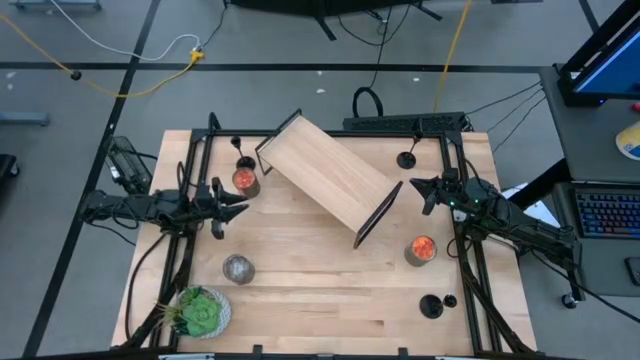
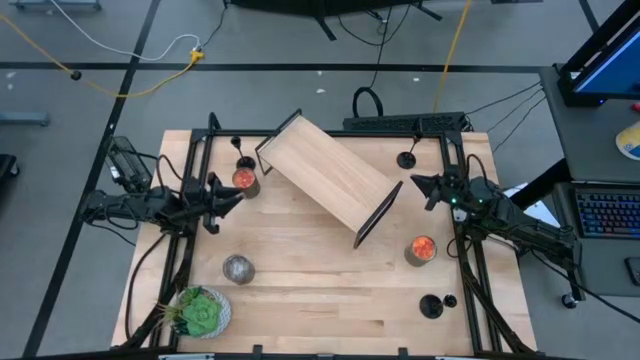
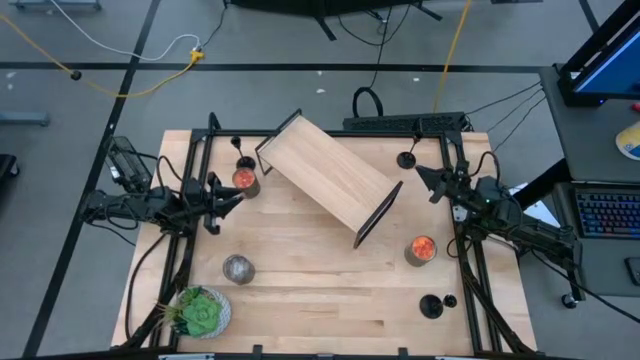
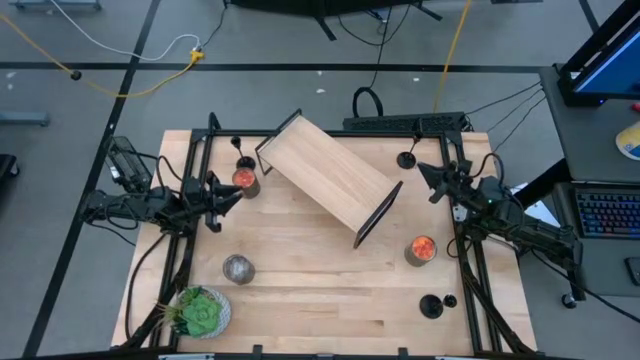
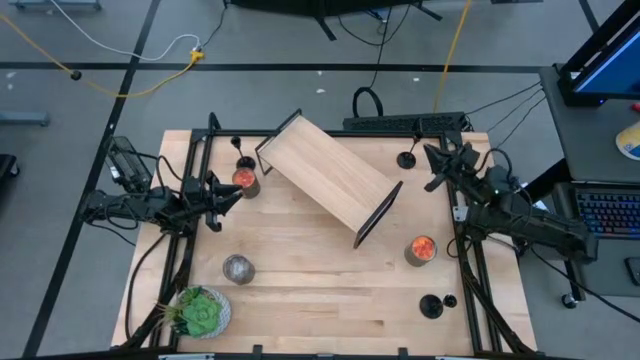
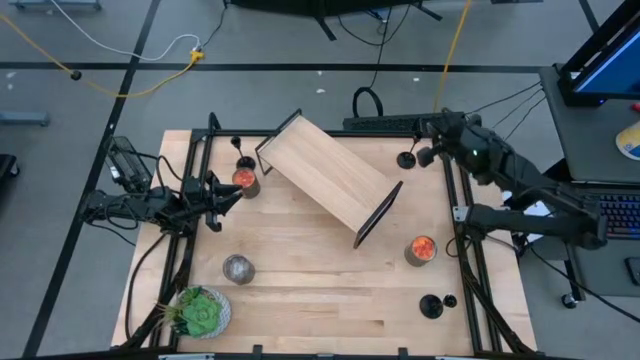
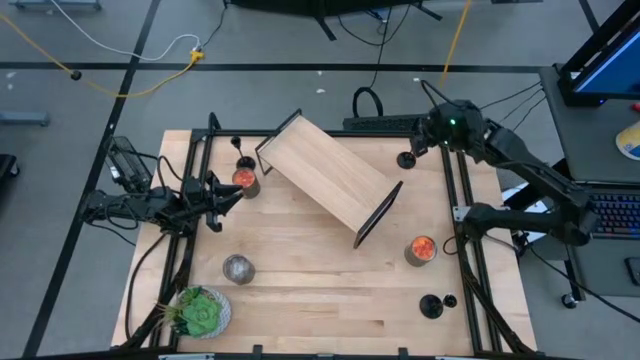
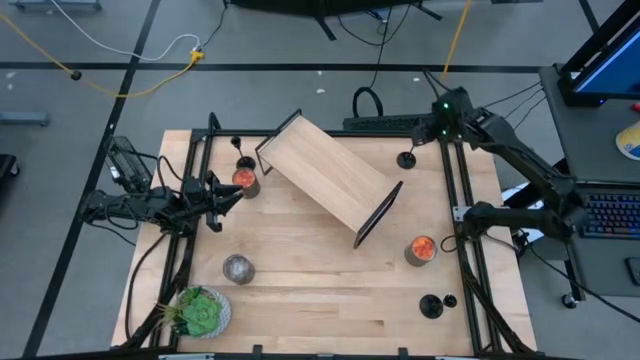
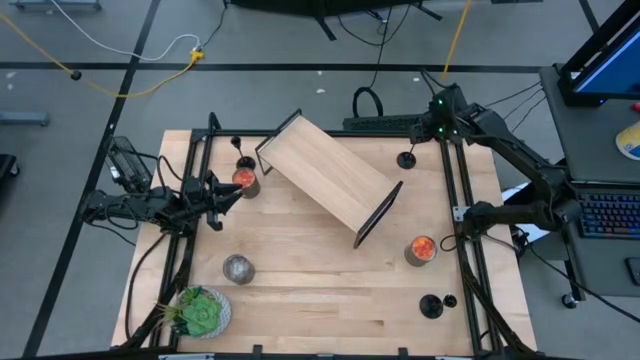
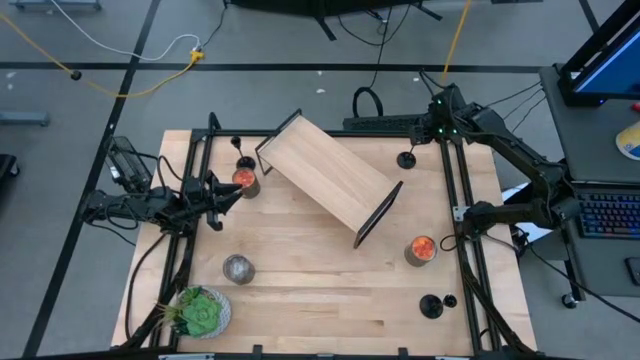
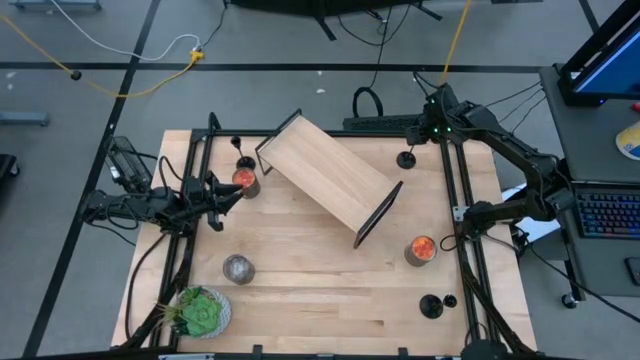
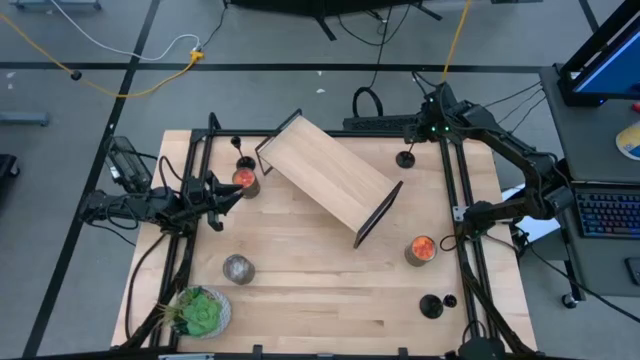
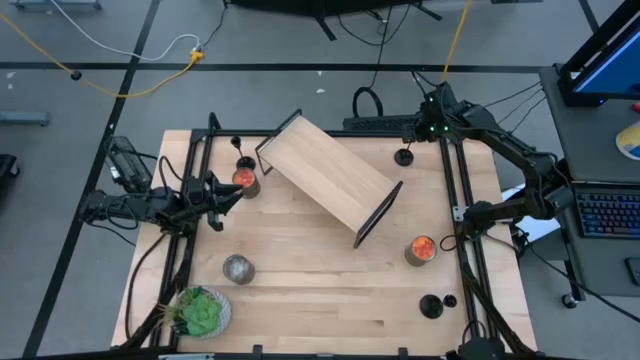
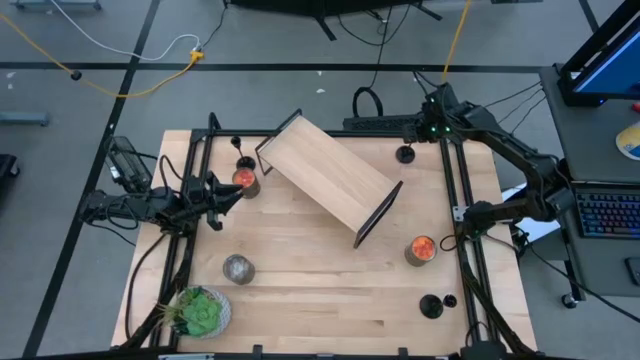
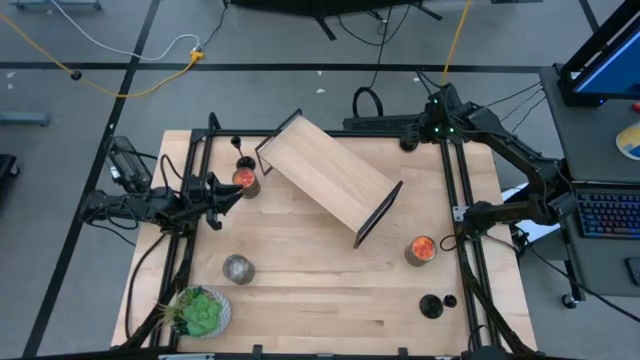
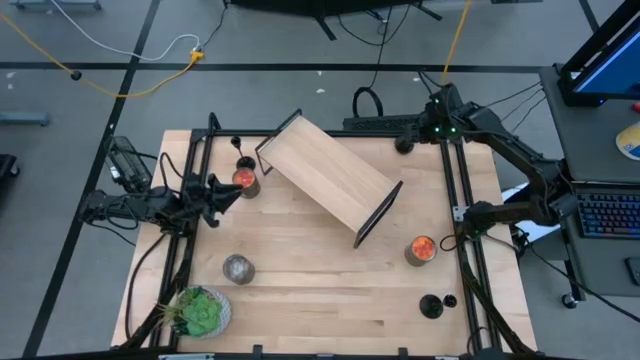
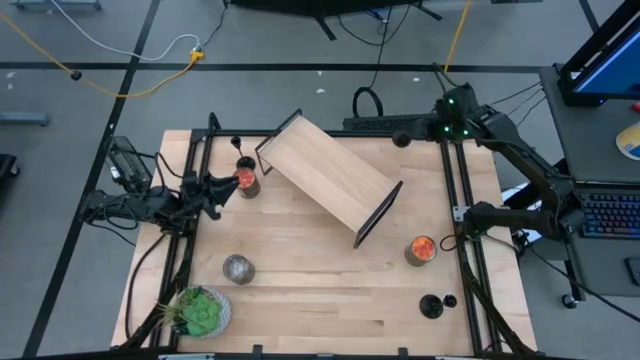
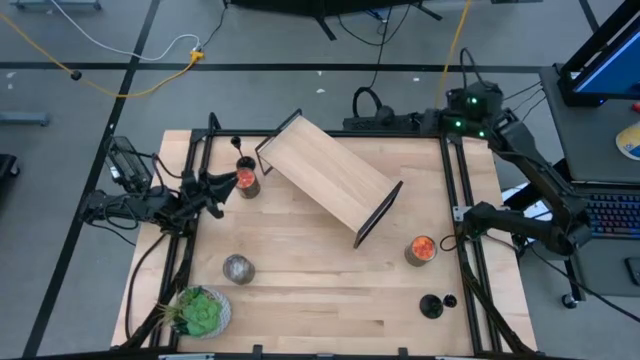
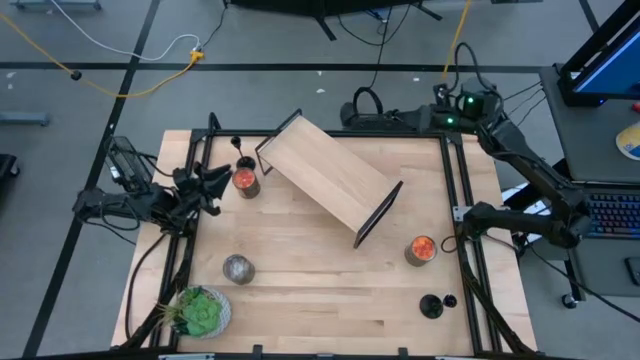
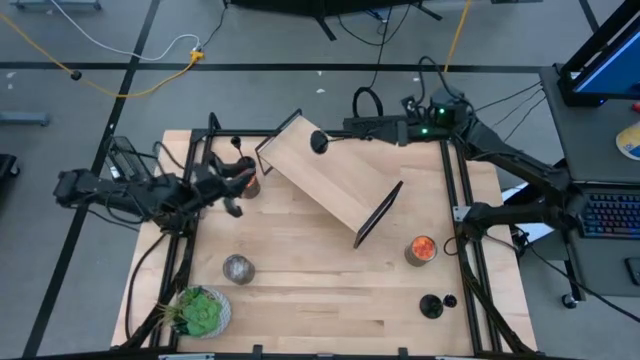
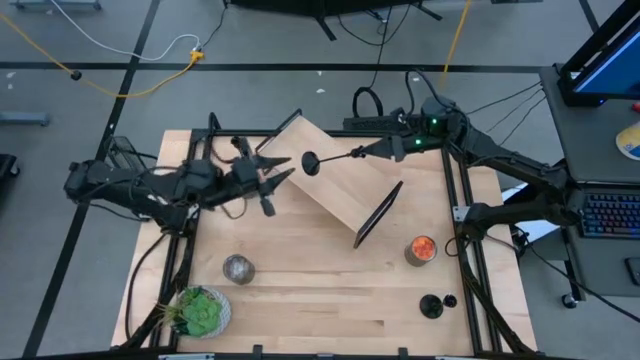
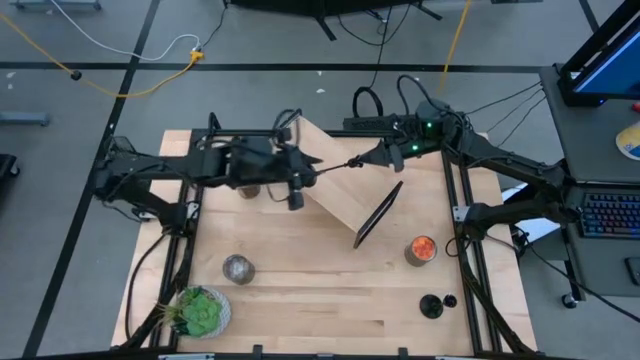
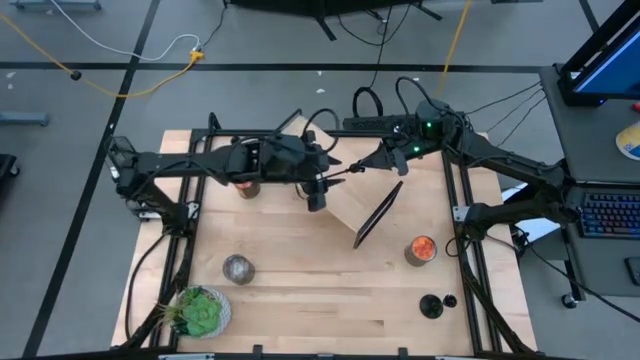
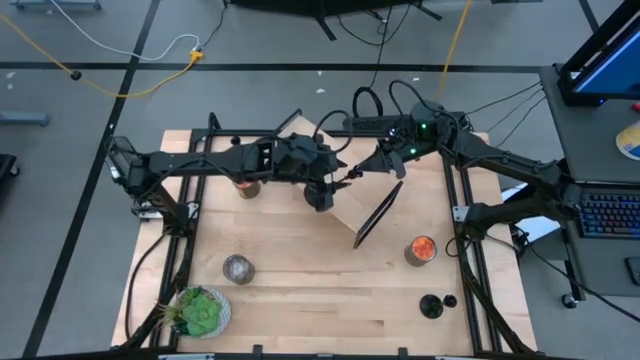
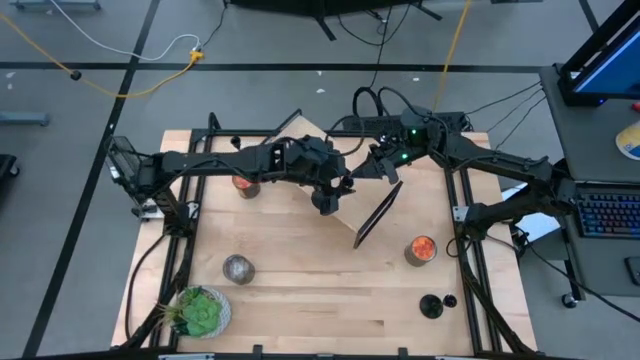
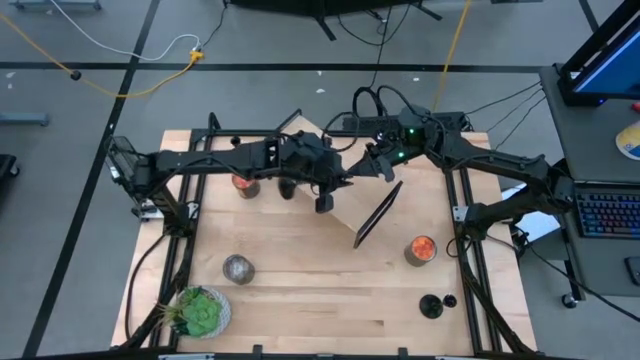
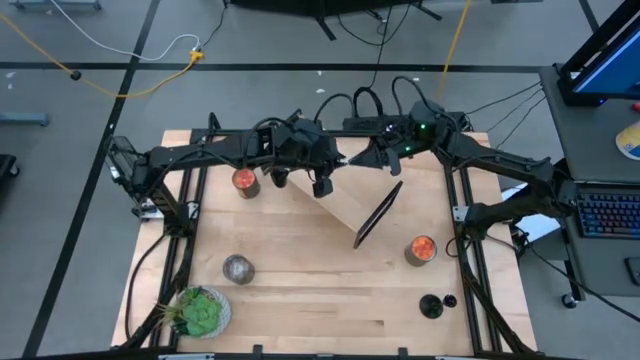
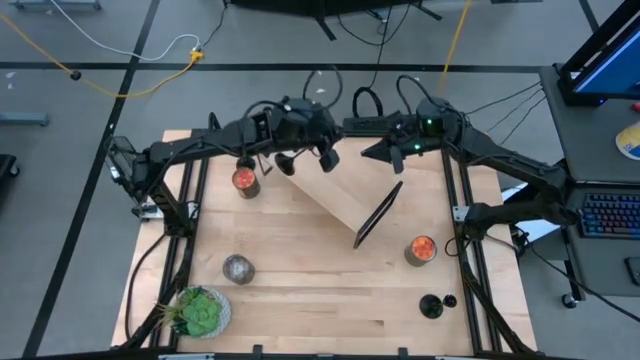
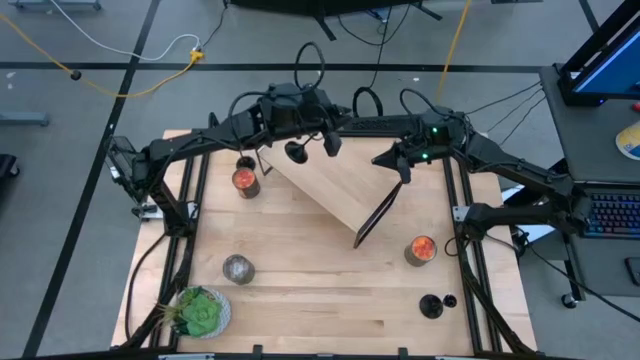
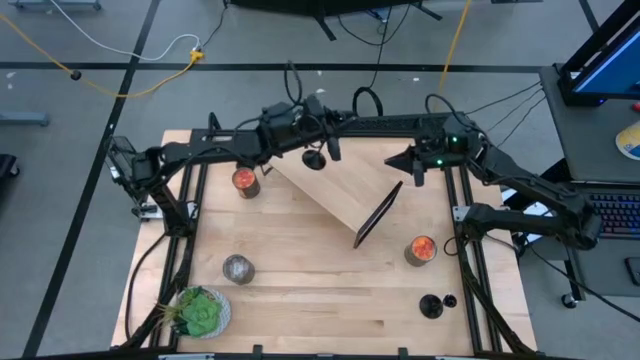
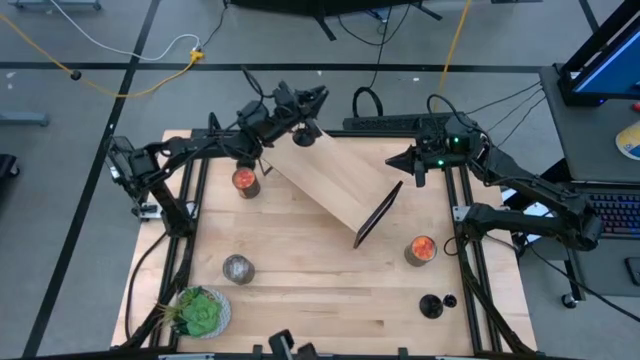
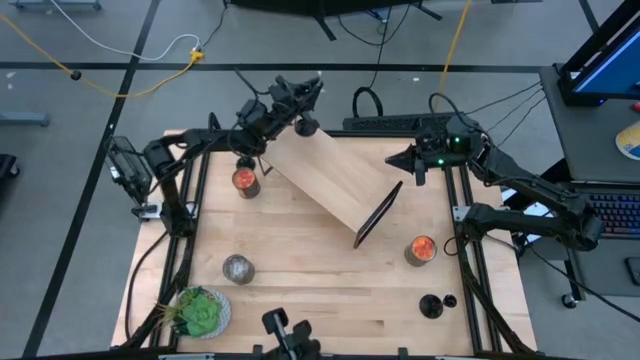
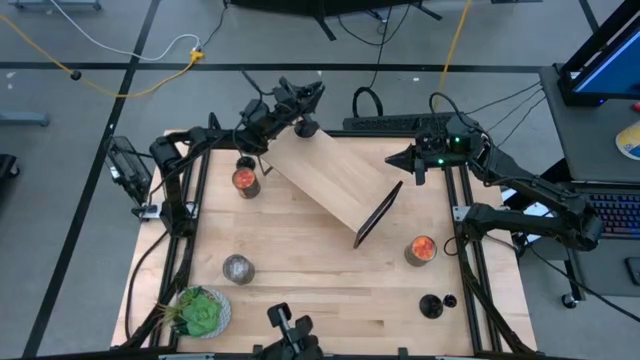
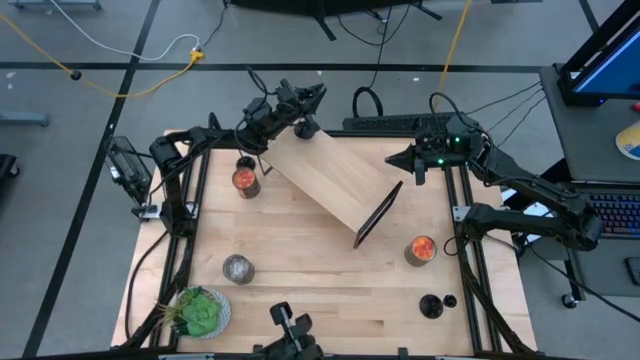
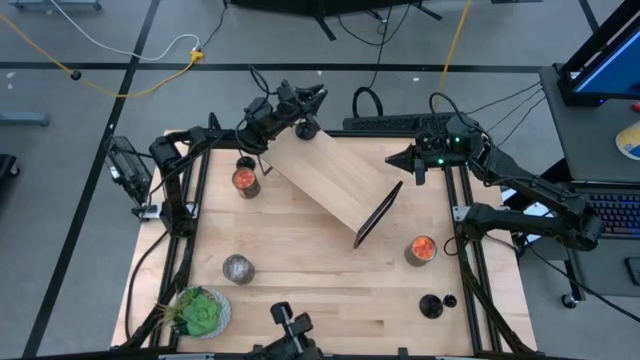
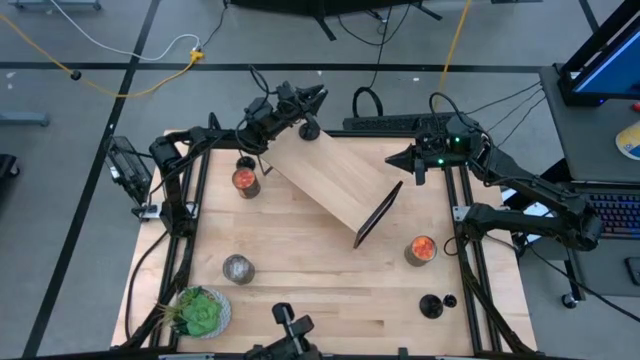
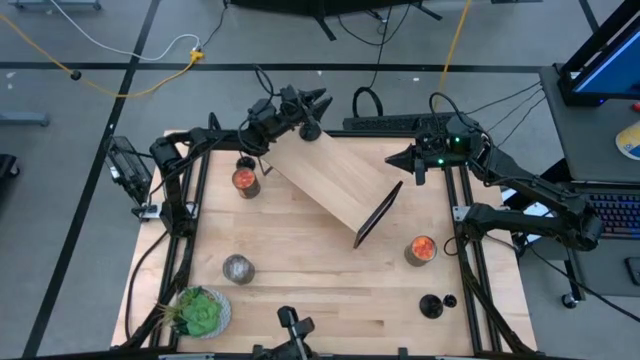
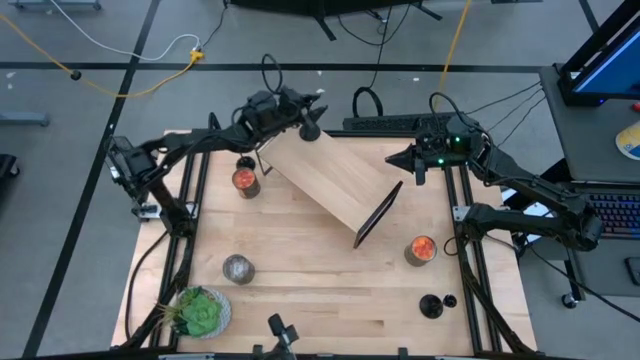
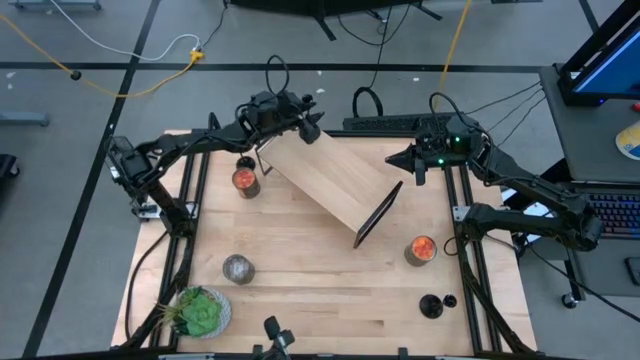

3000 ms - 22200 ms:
Task: Pick & Place candle stick holders
Put the top right black candle holder on the shelf
